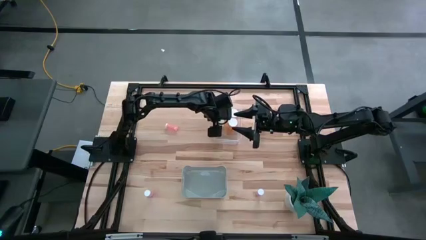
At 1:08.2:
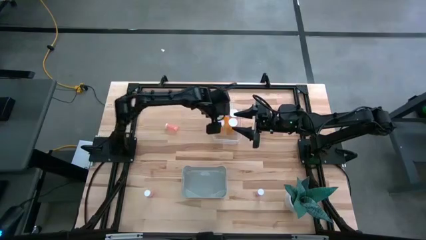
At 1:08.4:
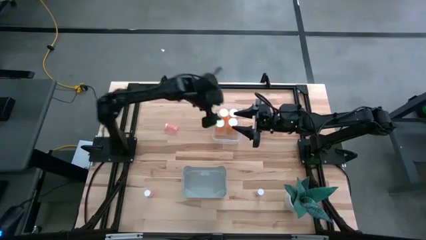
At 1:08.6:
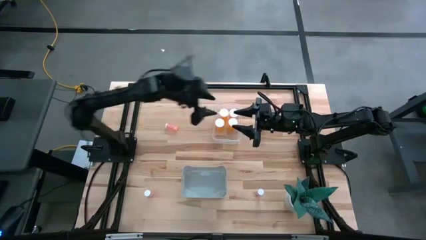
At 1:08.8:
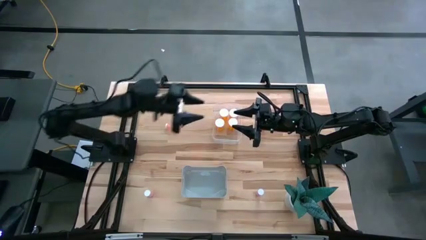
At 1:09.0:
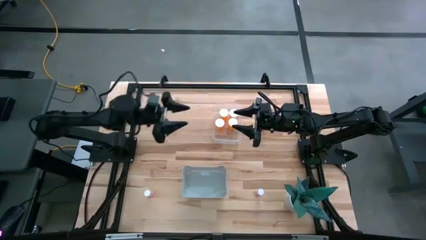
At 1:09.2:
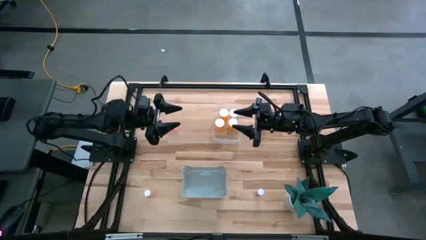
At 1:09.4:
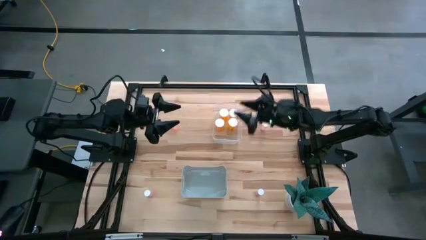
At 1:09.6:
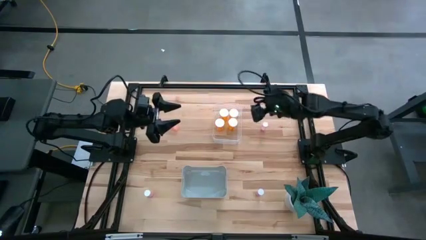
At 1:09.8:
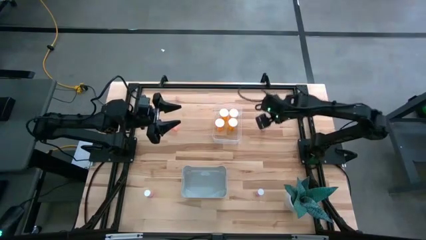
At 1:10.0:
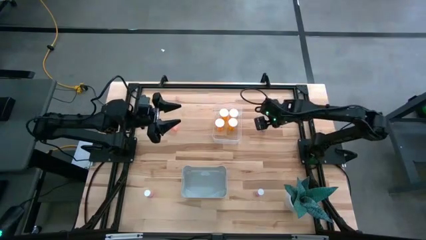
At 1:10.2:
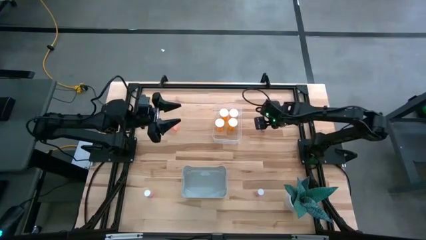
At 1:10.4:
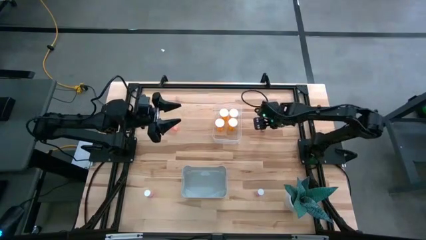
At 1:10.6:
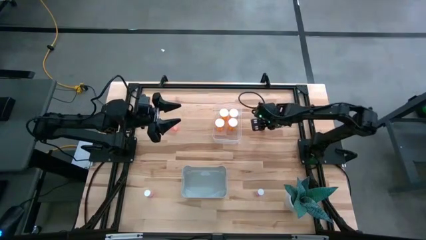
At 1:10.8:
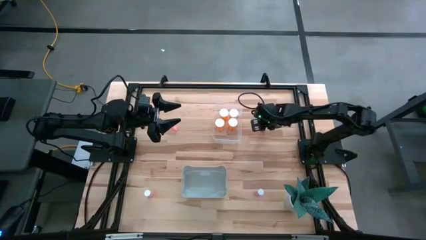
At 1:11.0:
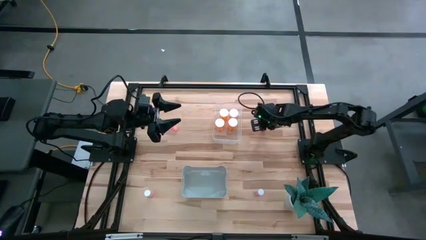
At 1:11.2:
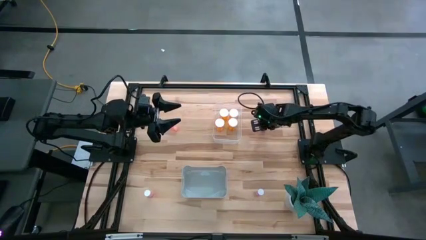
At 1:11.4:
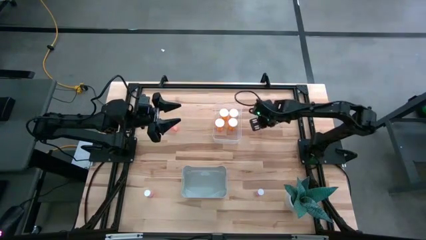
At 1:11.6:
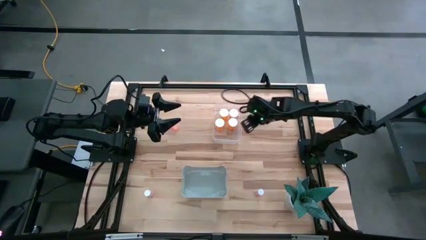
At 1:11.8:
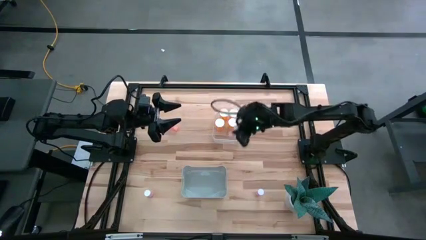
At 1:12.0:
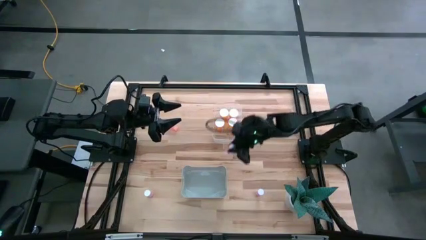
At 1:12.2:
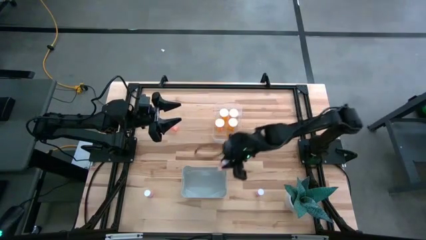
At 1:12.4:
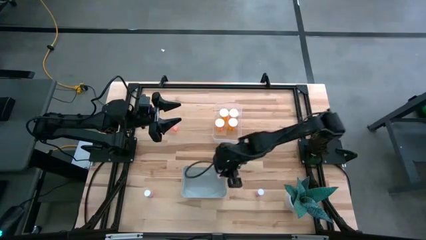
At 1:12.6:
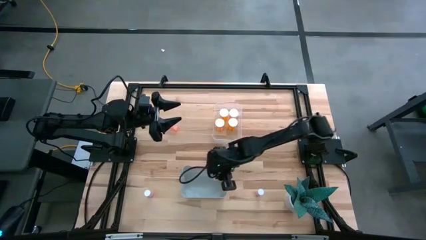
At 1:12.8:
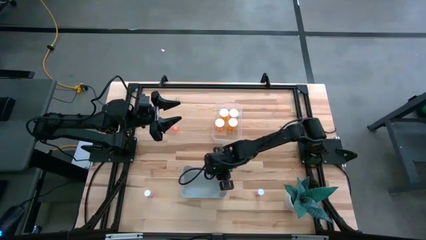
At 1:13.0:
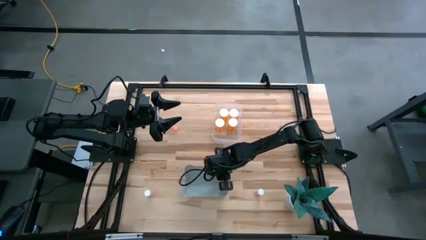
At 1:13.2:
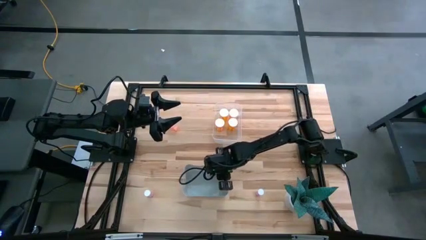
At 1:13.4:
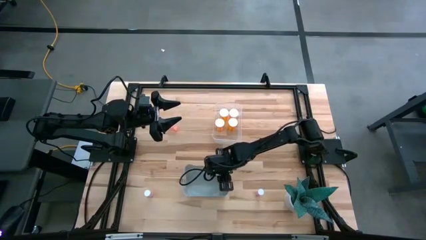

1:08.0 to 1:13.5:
Task: Pick and place medicine bottles into bin by pill shape (circle, oval)
Put the top right pink pill bottle into the gray bin

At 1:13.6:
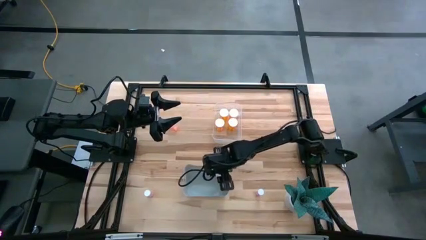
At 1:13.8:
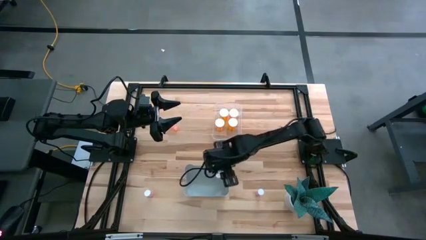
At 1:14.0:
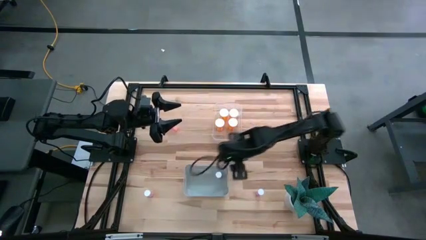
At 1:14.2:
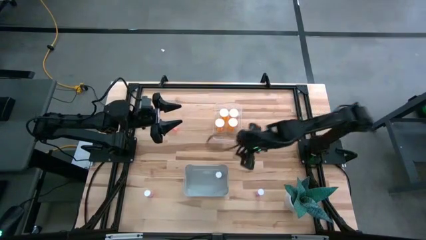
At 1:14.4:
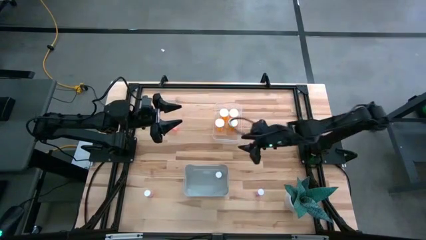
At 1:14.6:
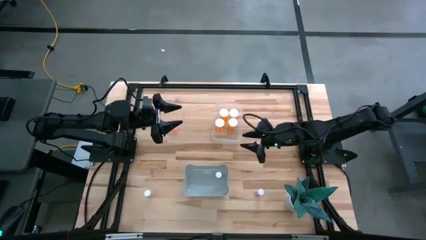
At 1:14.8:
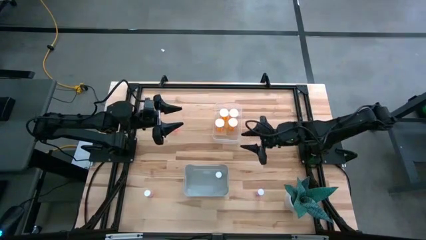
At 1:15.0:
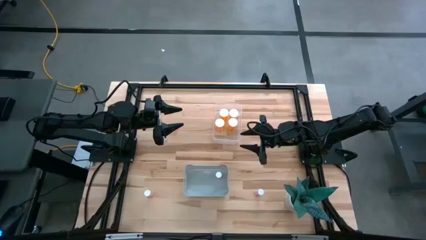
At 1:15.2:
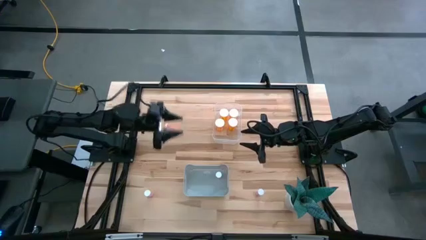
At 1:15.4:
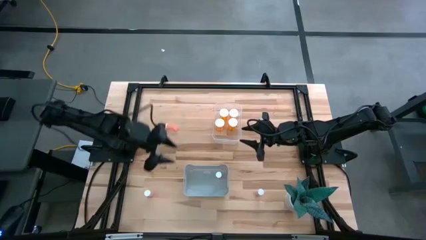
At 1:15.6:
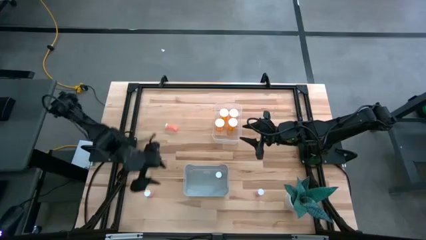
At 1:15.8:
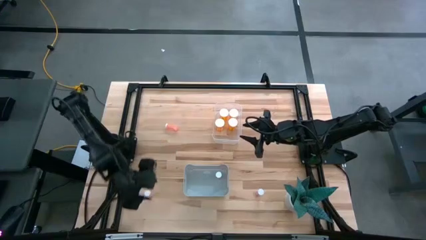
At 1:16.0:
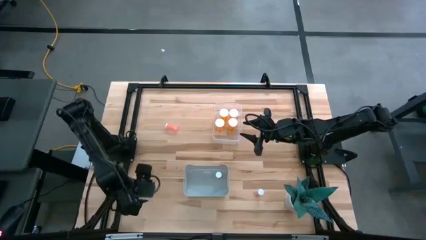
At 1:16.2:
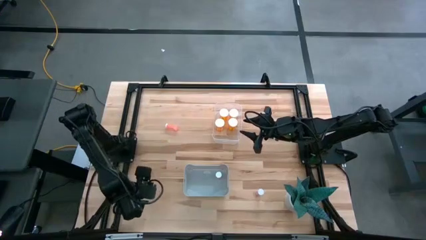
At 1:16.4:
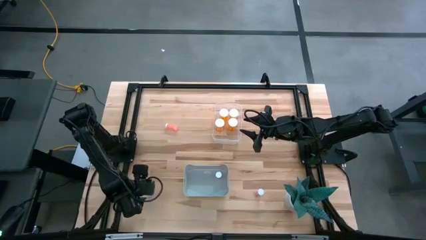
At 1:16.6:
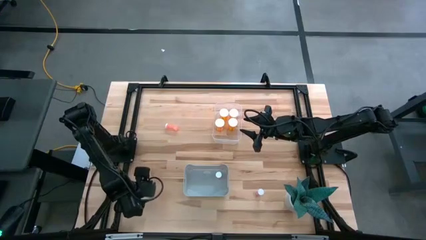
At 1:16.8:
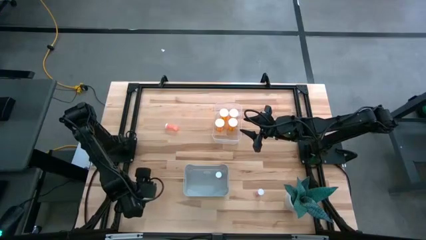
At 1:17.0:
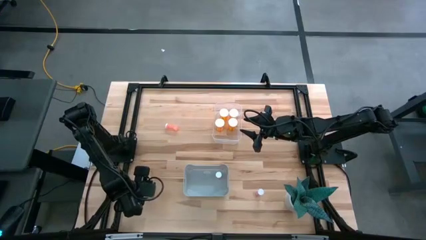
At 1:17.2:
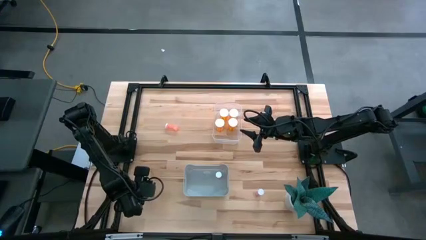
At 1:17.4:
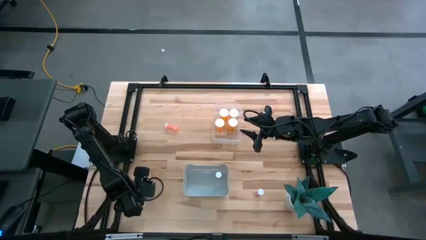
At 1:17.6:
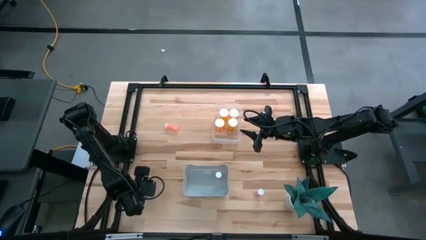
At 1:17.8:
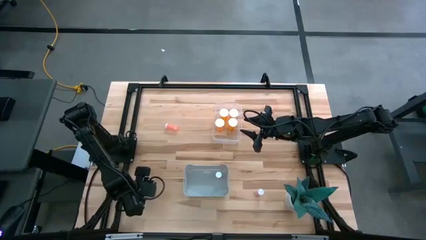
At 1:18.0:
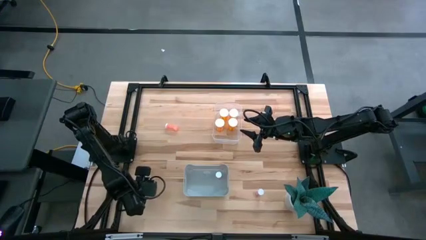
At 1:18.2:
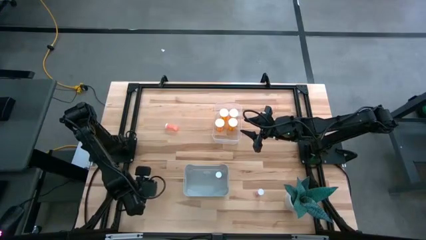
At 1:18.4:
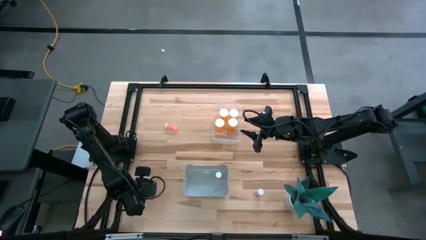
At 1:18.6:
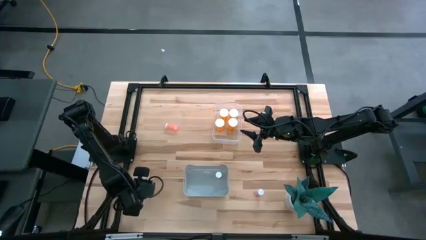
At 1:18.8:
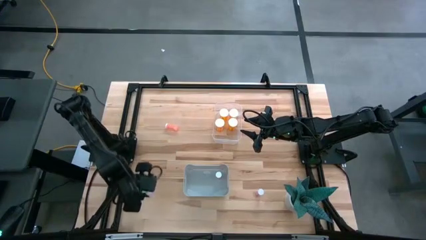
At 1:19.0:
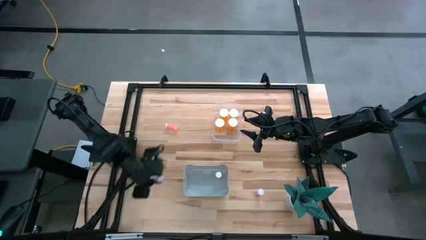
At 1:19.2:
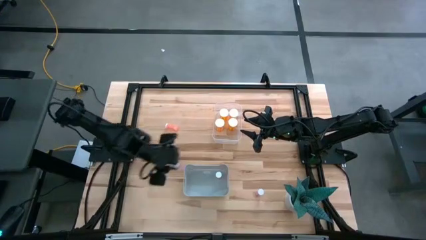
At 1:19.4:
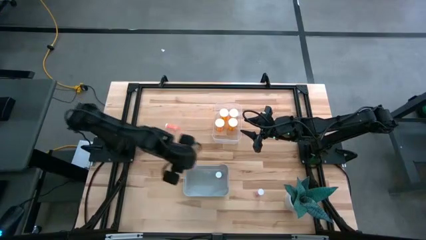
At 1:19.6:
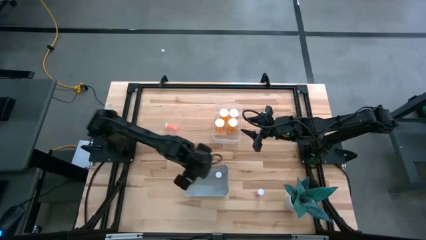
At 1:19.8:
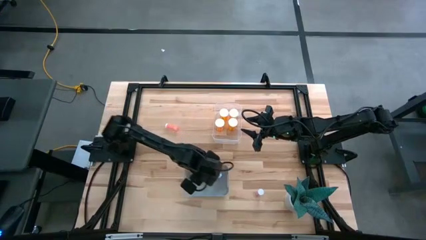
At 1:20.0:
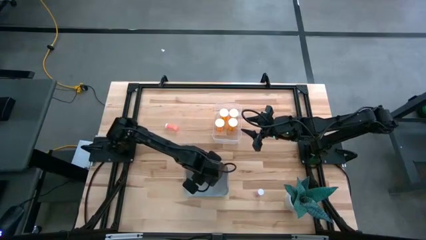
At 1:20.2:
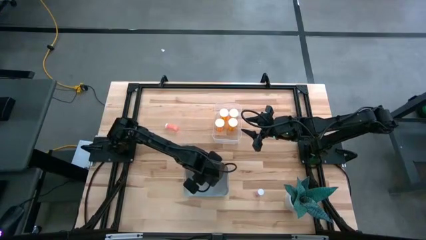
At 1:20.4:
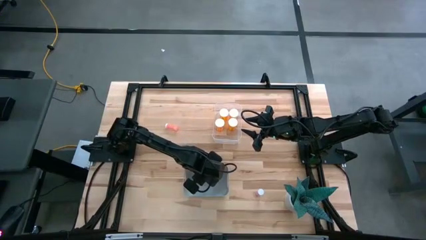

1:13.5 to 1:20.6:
Put the bottom left pink pill bottle into the gray bin

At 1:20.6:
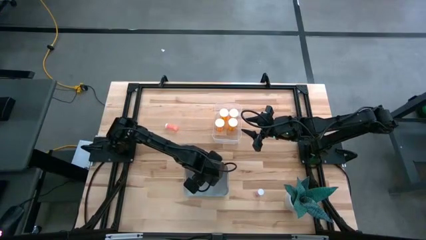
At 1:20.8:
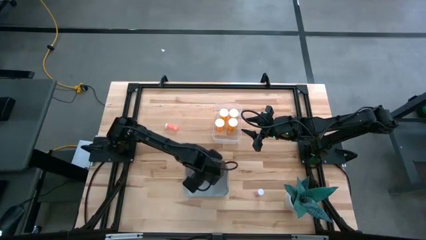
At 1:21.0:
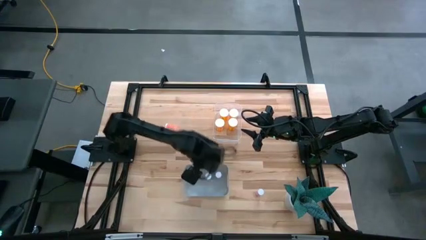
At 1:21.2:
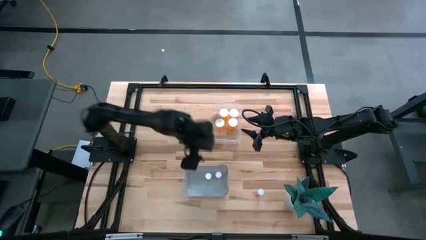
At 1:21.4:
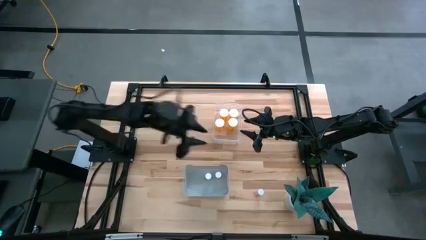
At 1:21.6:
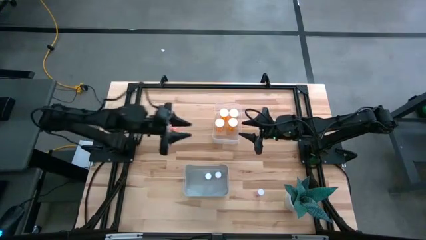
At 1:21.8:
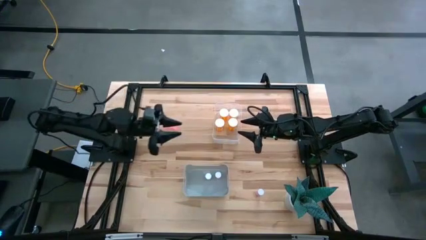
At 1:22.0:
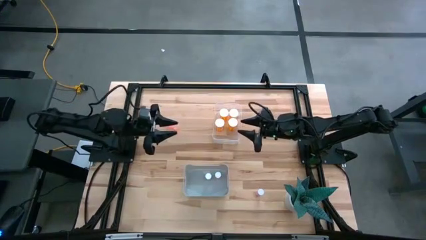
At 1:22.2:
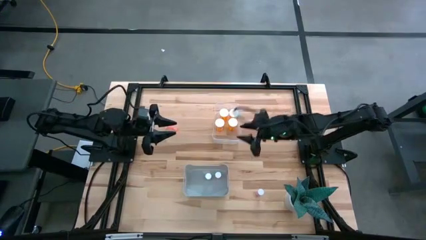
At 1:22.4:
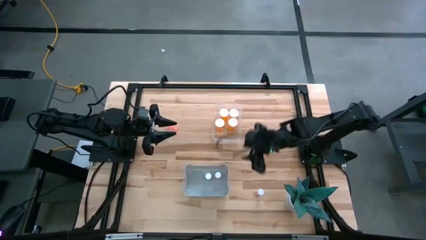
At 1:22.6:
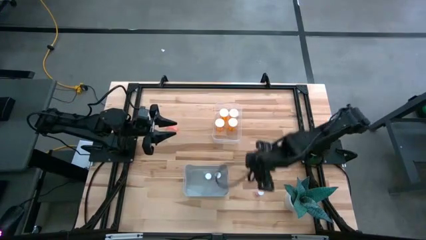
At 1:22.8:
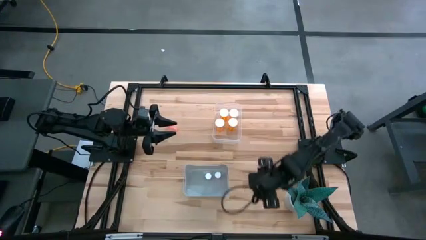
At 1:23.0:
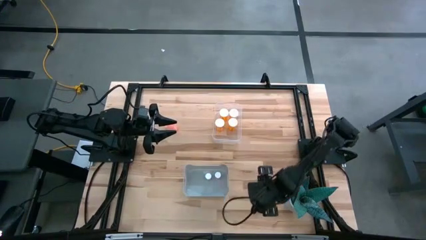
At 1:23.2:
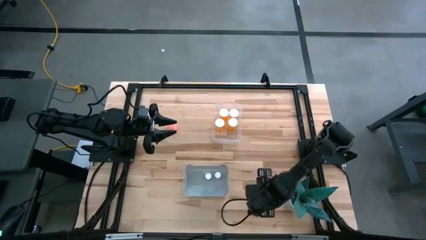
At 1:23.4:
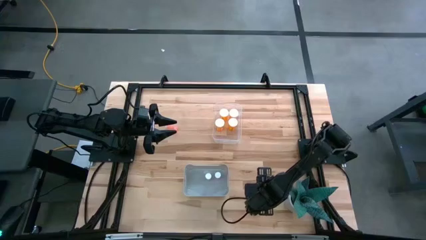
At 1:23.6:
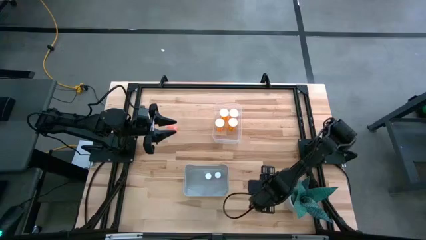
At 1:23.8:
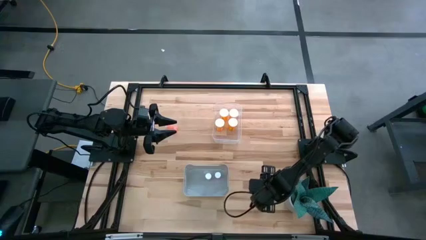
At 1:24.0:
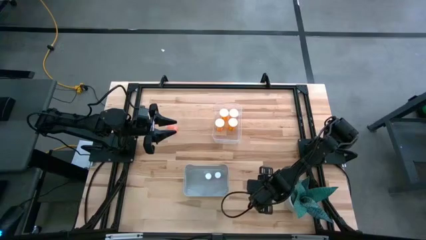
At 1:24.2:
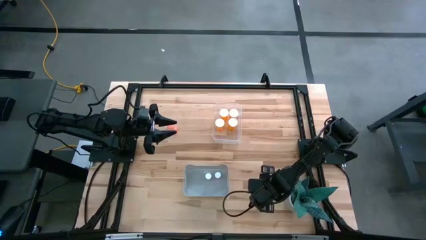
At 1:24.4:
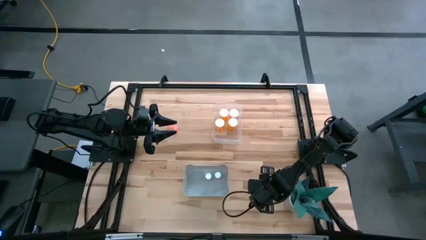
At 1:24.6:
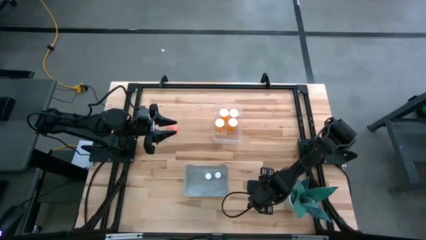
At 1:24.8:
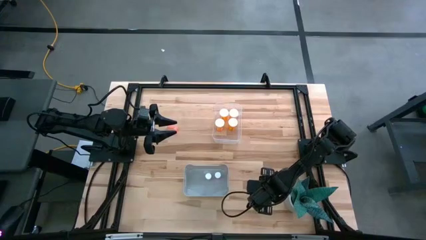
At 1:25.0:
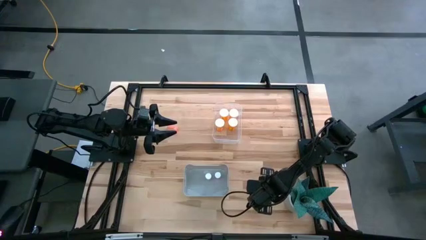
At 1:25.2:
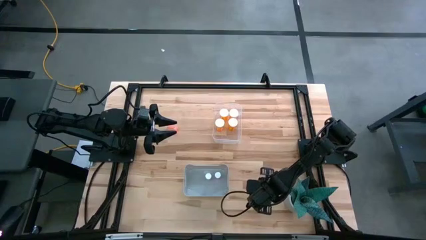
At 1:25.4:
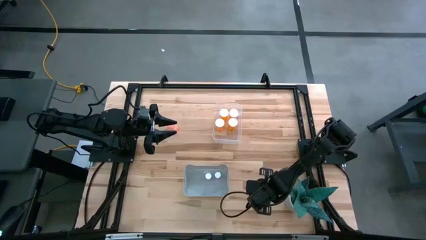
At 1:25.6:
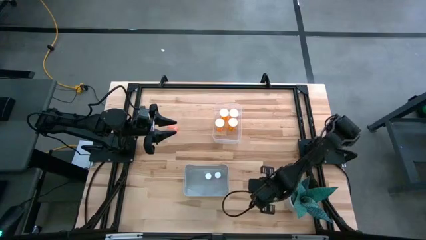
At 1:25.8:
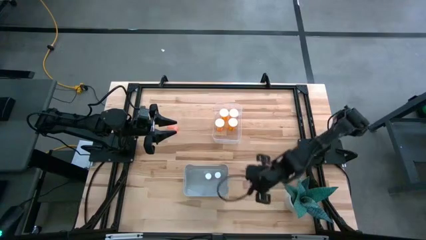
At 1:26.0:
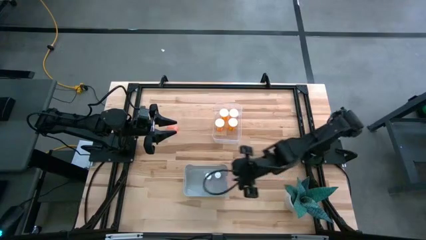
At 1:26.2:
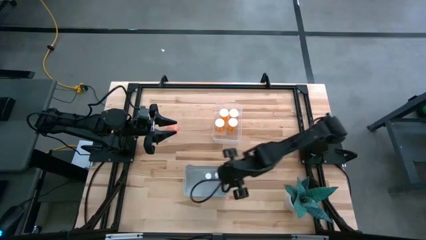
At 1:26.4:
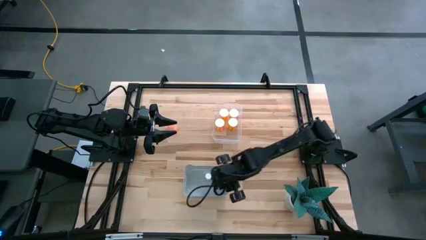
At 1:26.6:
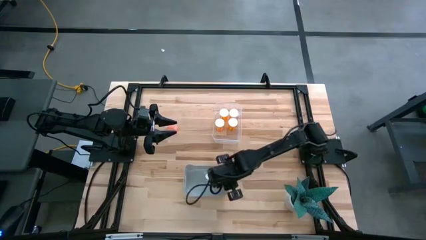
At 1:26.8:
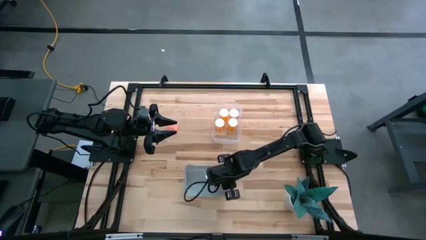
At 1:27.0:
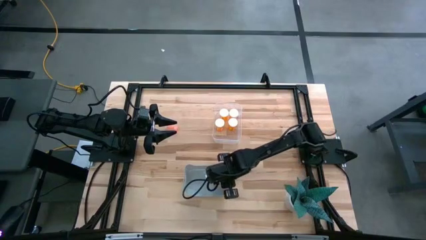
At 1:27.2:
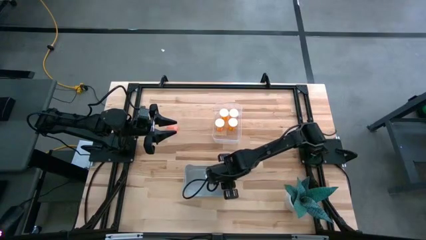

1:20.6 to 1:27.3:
Put the bottom right pink pill bottle into the gray bin
